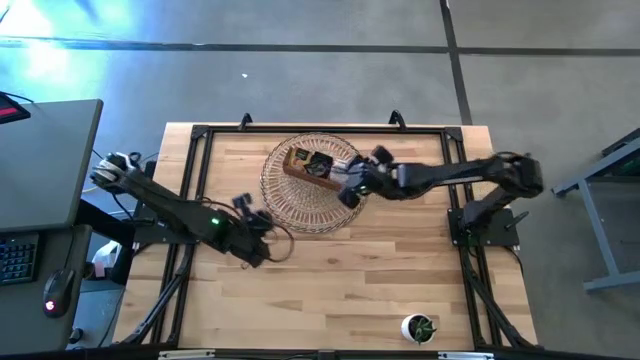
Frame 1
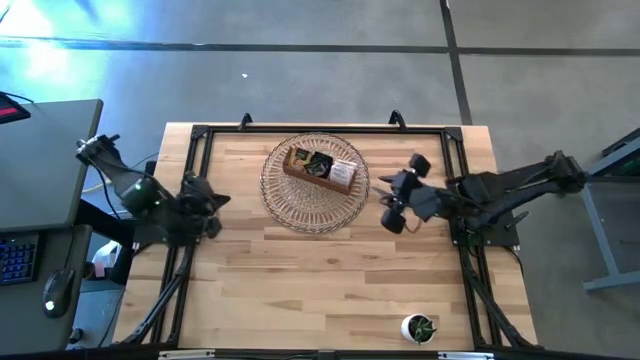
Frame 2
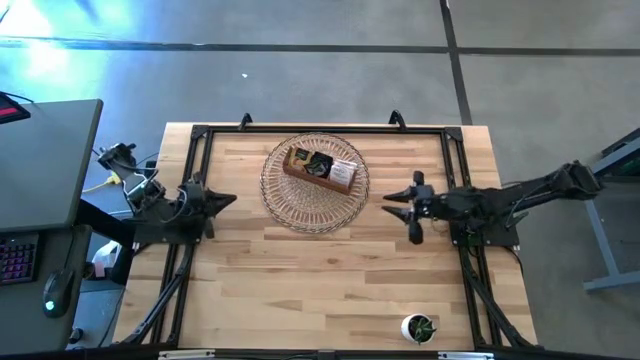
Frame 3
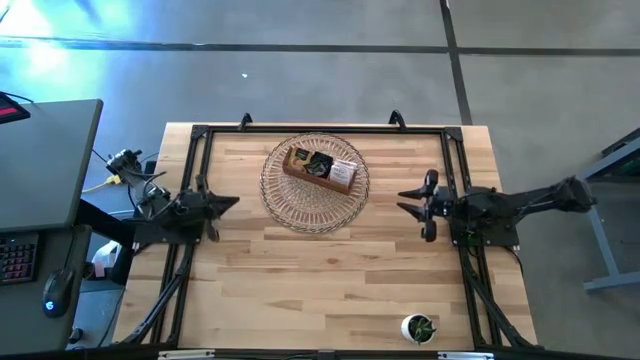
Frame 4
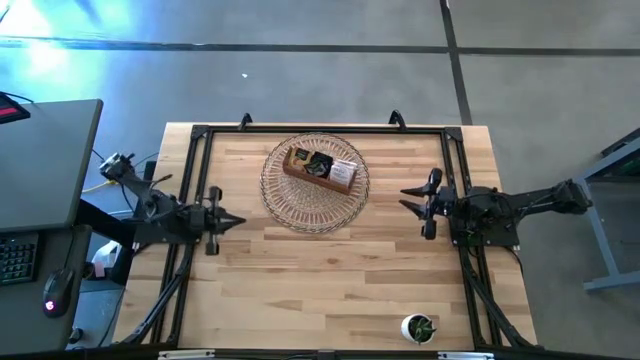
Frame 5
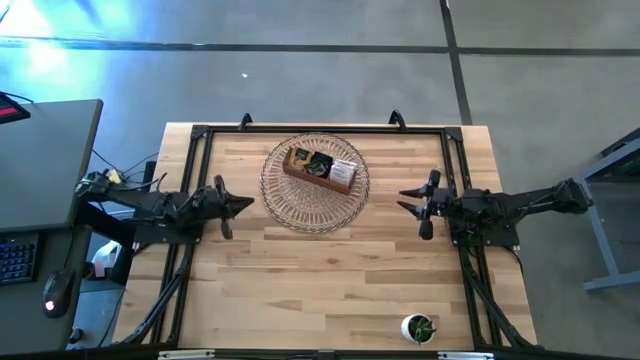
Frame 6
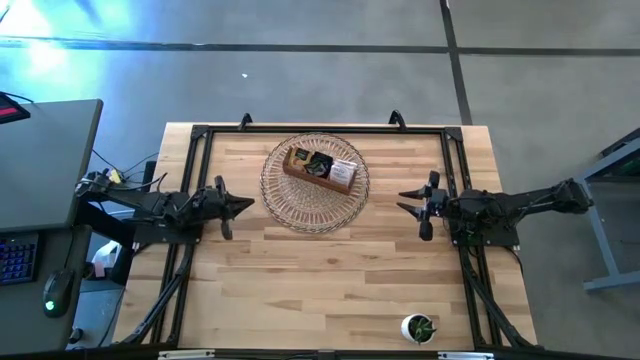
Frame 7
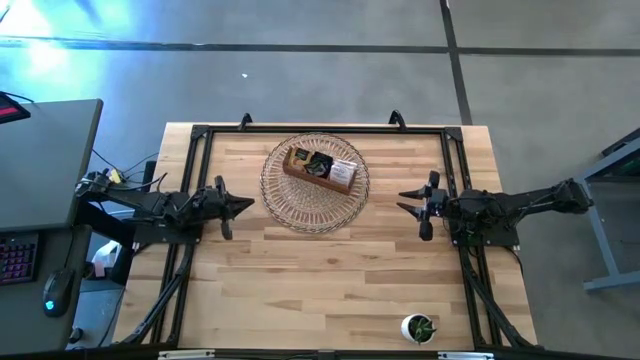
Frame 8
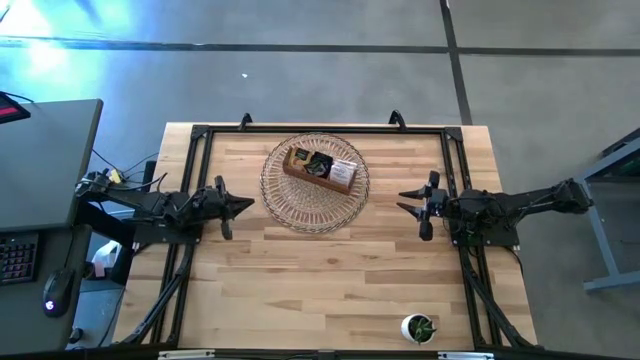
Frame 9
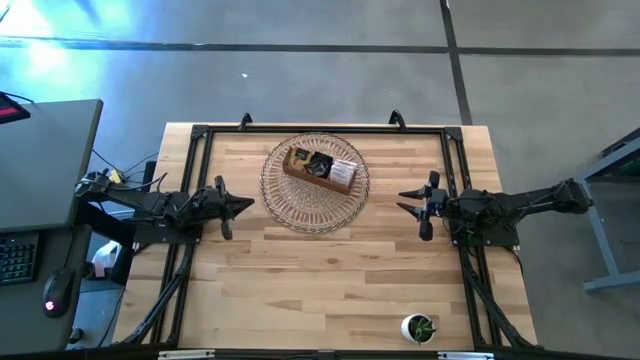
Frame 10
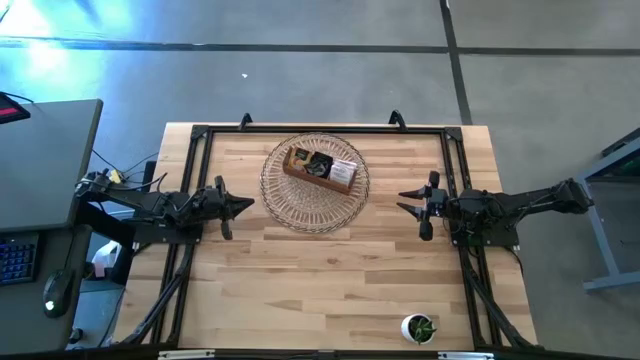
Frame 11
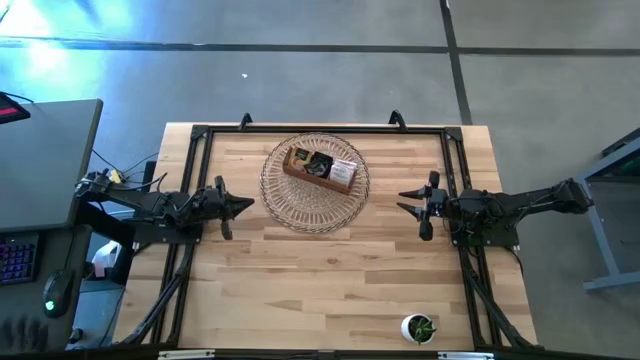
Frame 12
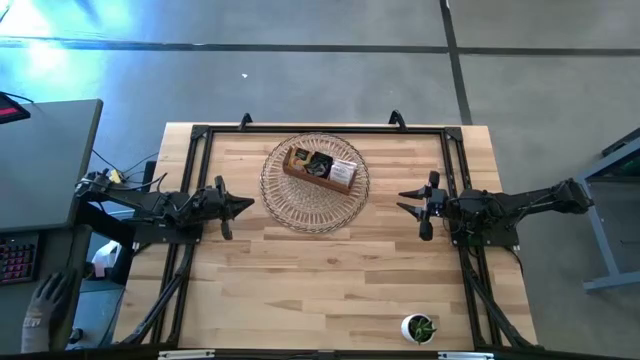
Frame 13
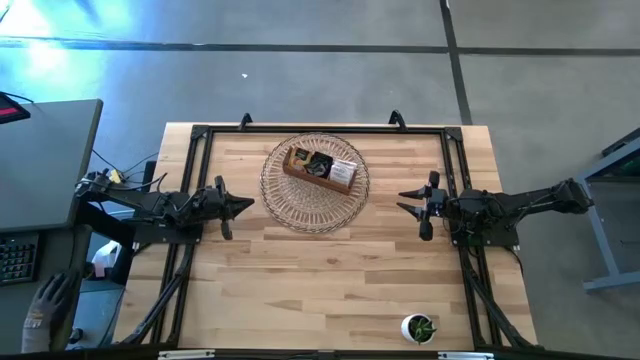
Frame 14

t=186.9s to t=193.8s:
Task: Pick & Place Tea
Return to Home Position

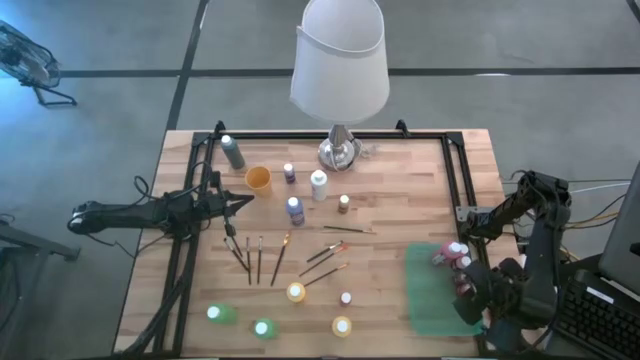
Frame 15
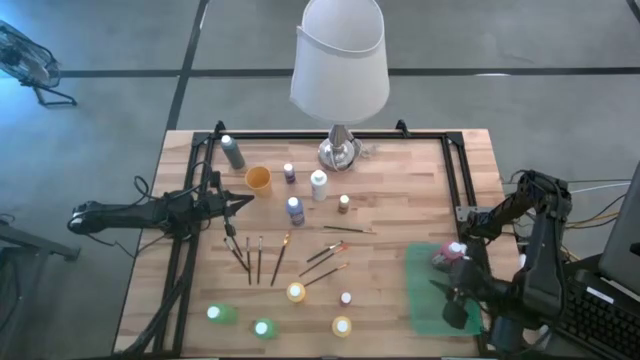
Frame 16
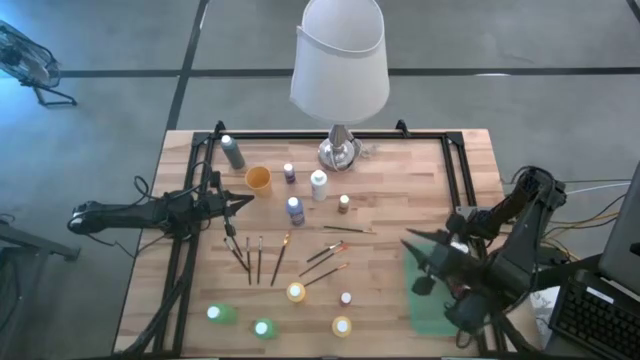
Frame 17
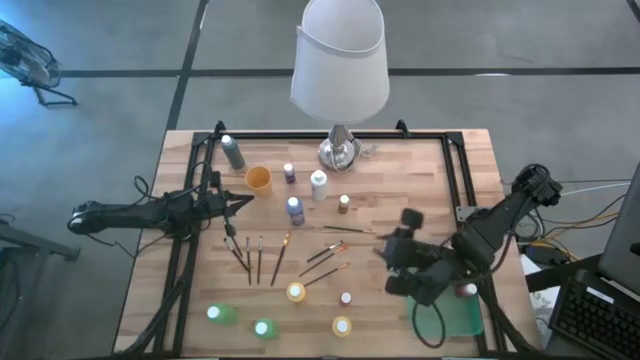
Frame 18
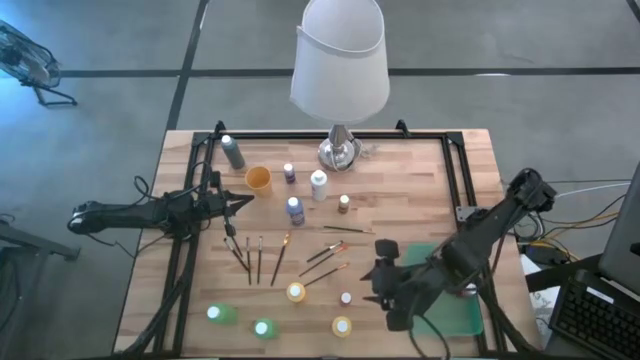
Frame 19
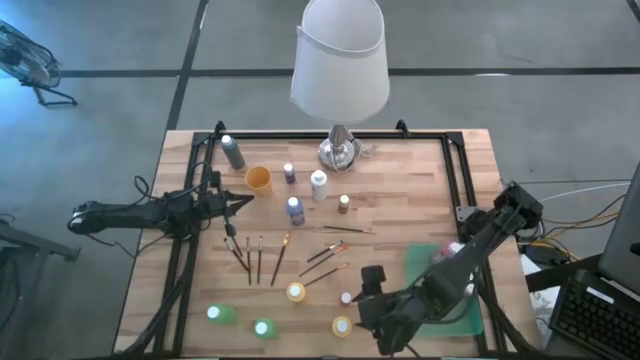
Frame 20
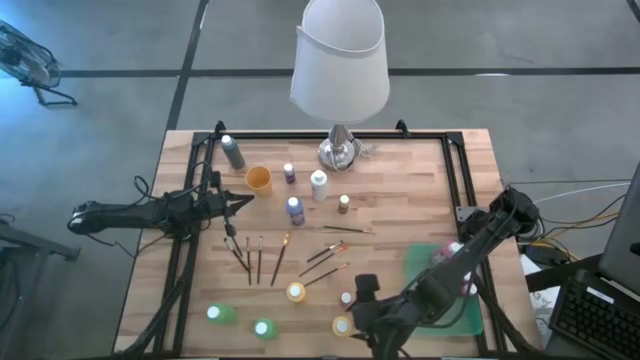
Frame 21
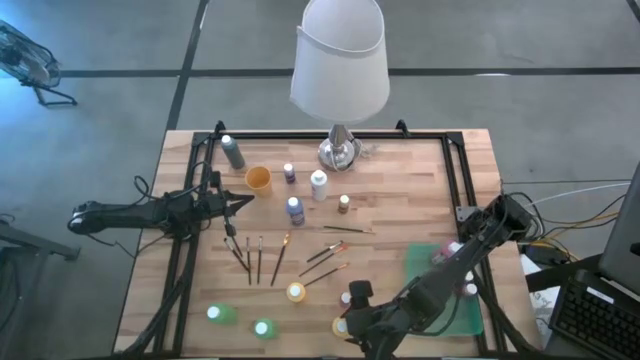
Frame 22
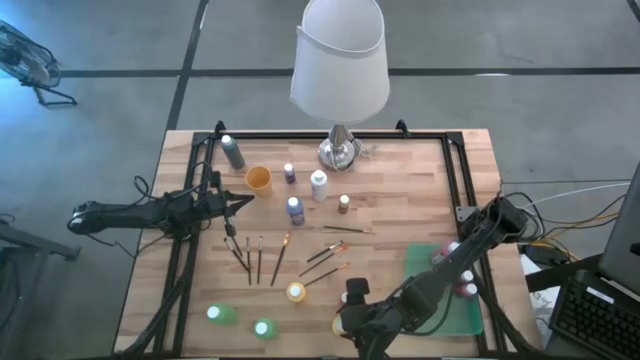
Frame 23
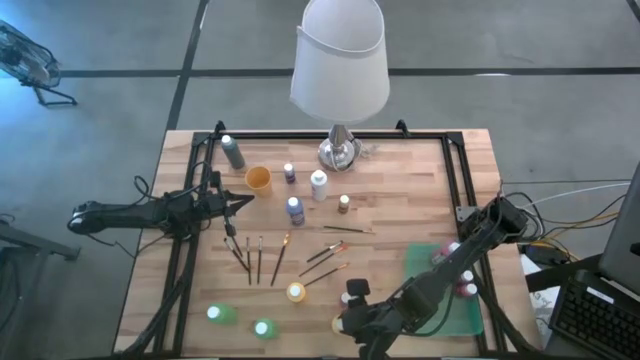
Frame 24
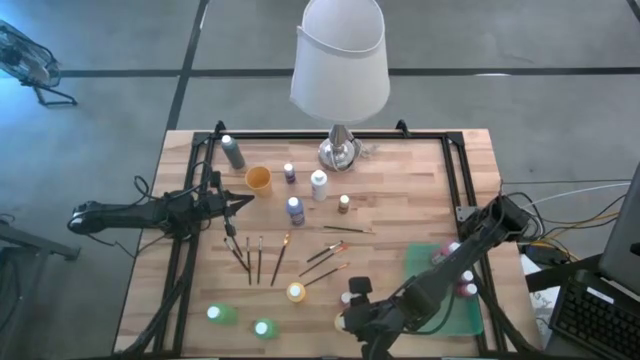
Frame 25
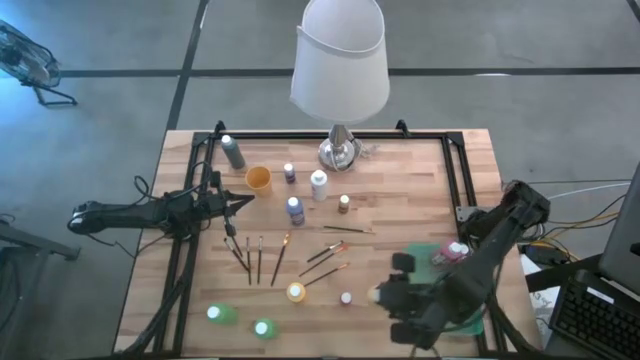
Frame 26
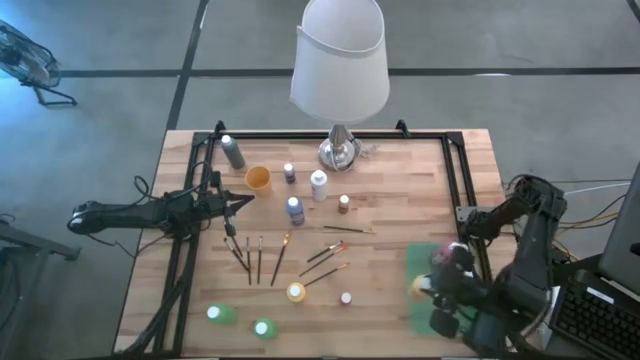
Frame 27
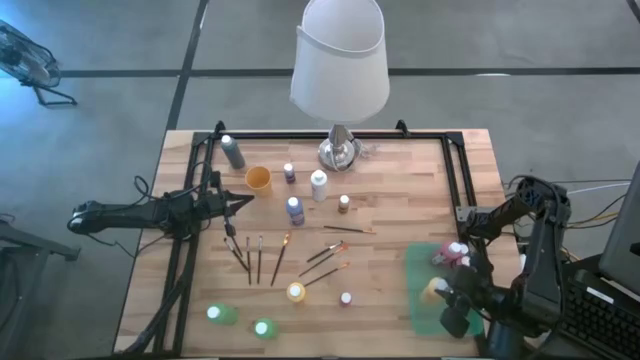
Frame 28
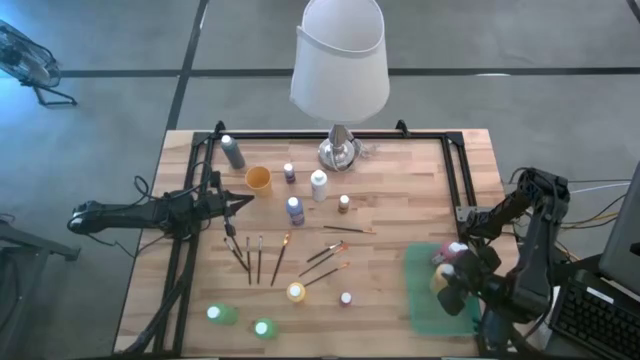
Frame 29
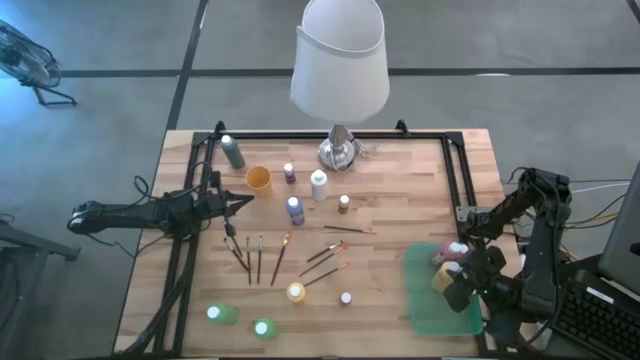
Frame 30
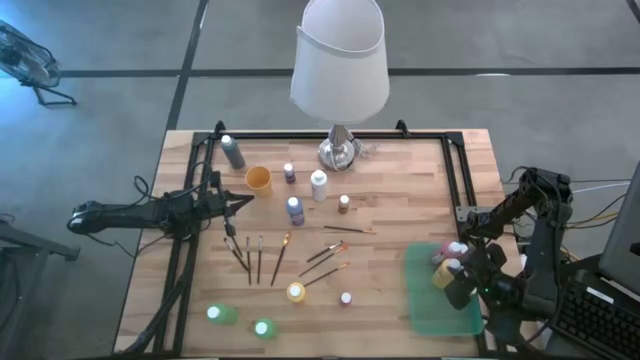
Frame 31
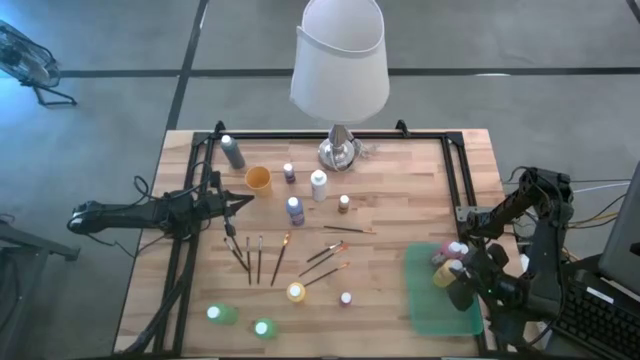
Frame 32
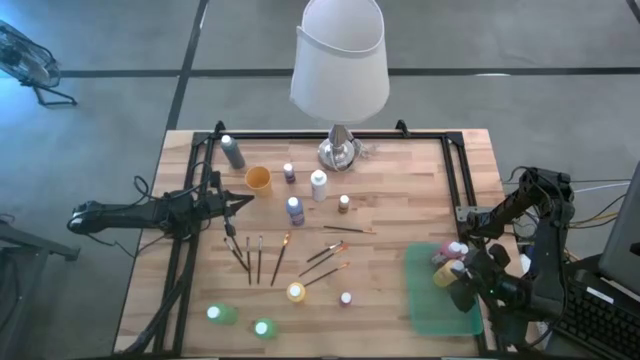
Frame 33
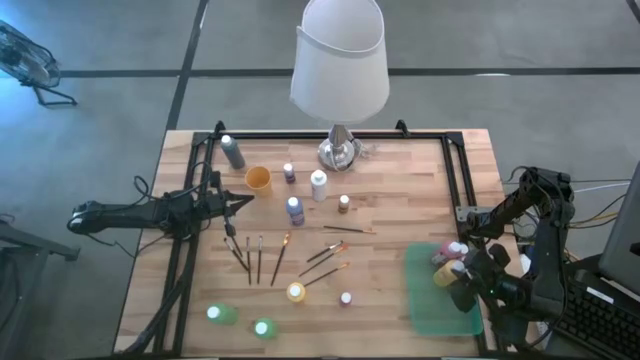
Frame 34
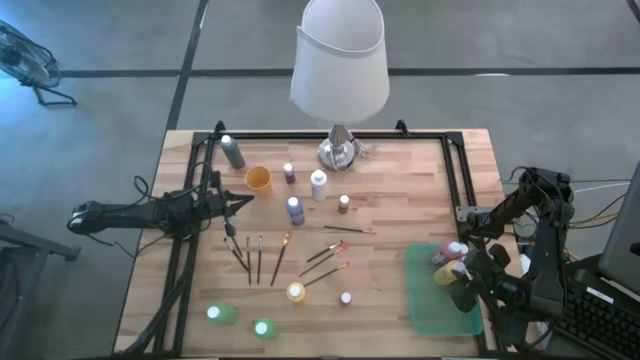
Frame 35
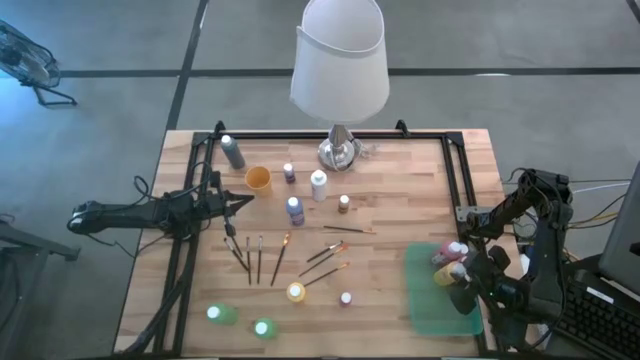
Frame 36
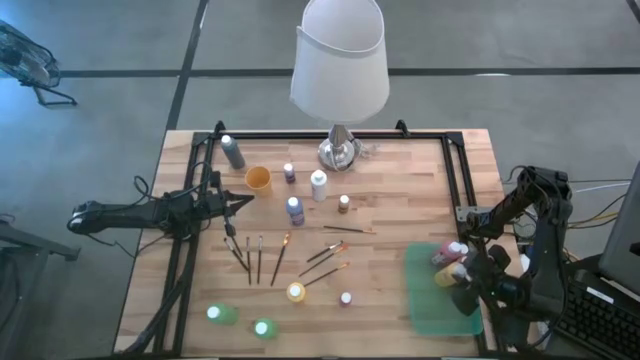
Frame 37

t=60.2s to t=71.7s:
Task: Pick & Place Paint Supplies
Put the yellow paint bottle into the green bin
